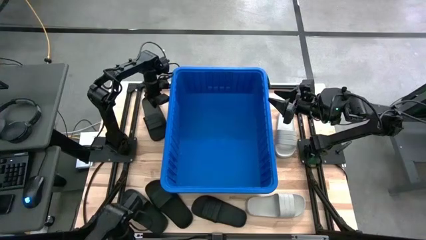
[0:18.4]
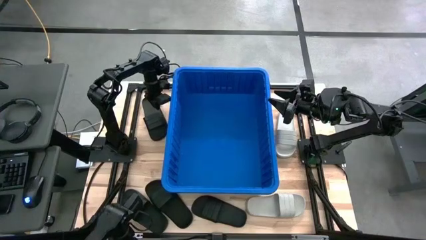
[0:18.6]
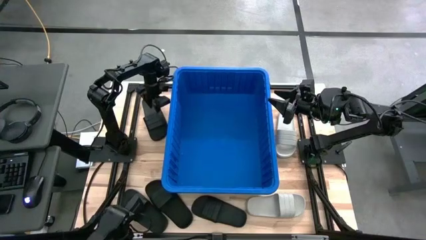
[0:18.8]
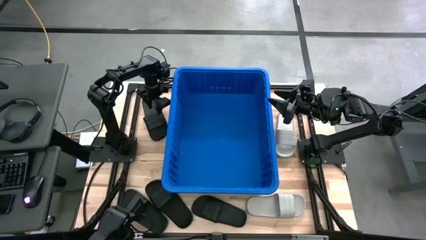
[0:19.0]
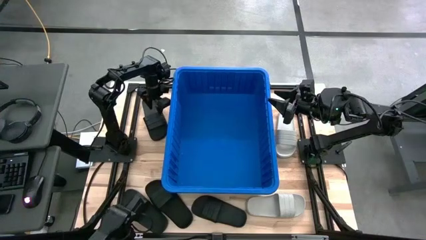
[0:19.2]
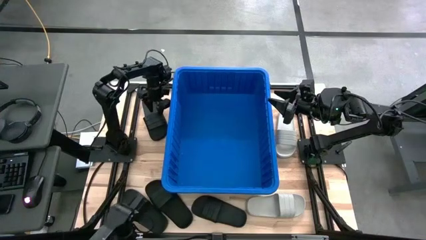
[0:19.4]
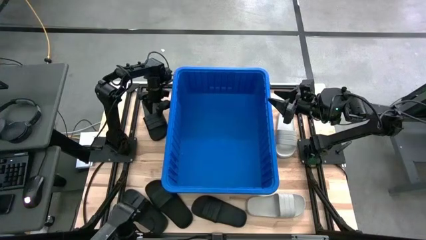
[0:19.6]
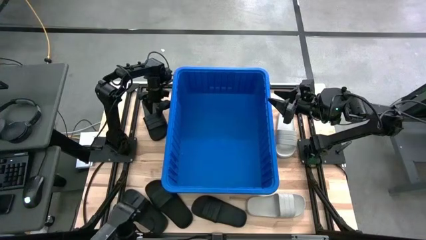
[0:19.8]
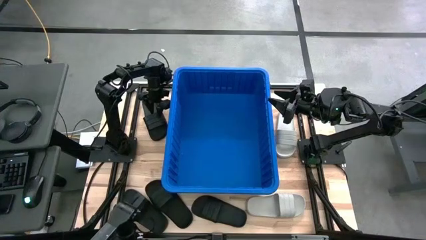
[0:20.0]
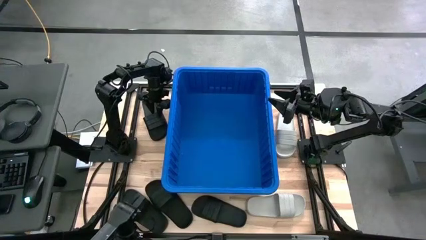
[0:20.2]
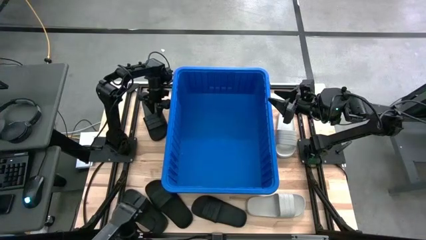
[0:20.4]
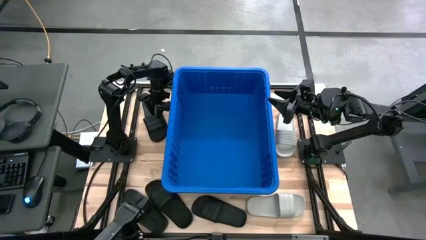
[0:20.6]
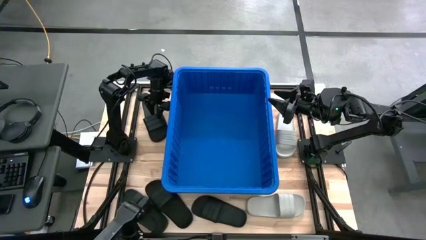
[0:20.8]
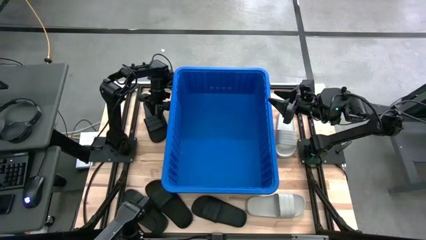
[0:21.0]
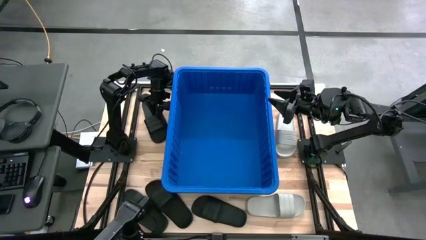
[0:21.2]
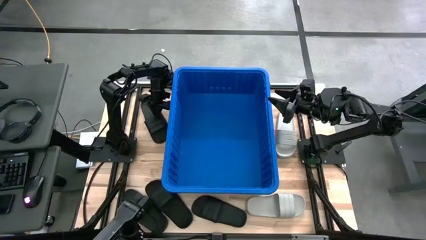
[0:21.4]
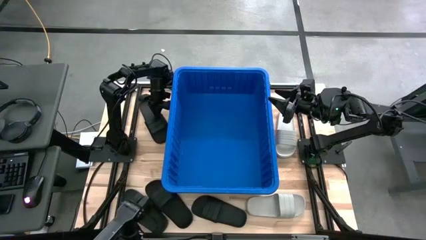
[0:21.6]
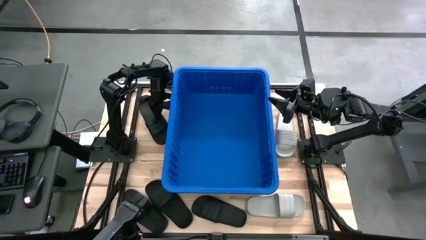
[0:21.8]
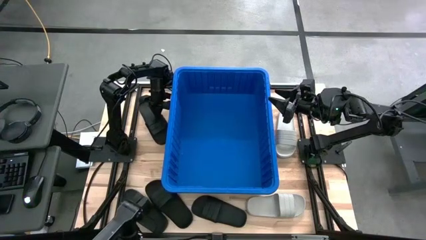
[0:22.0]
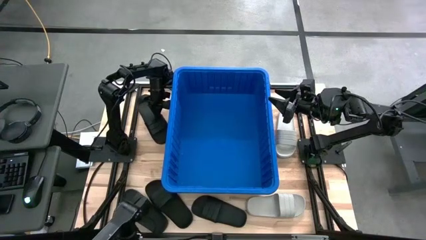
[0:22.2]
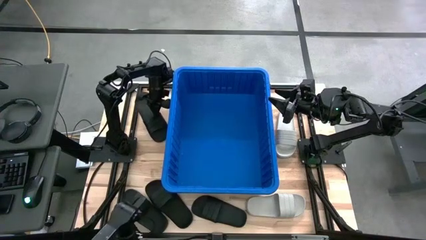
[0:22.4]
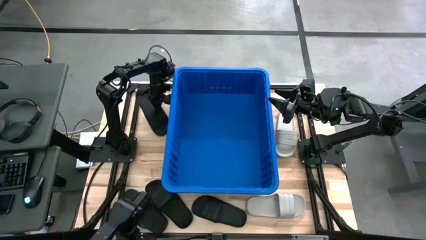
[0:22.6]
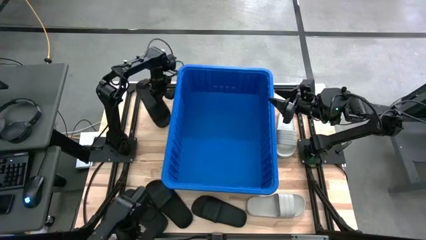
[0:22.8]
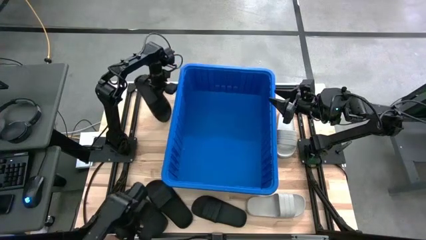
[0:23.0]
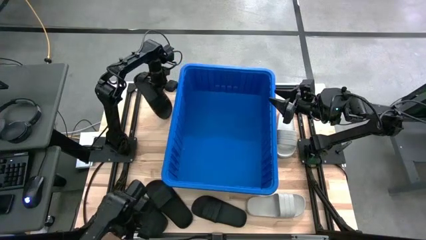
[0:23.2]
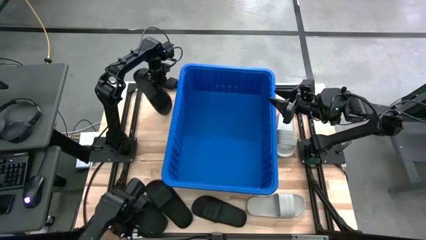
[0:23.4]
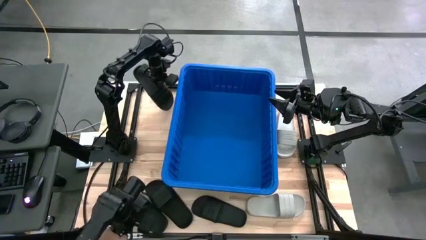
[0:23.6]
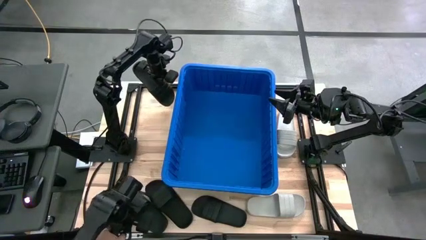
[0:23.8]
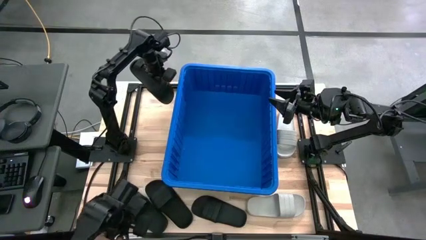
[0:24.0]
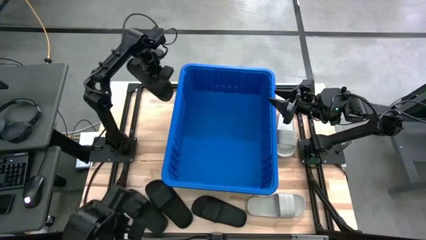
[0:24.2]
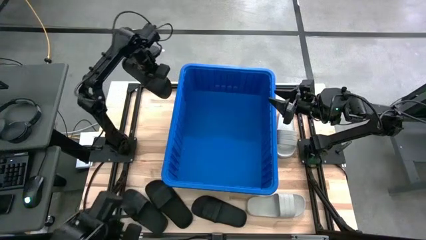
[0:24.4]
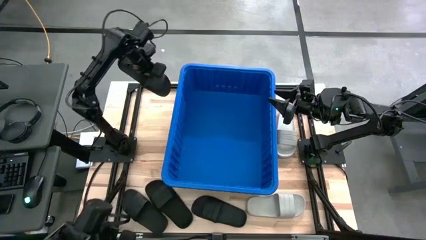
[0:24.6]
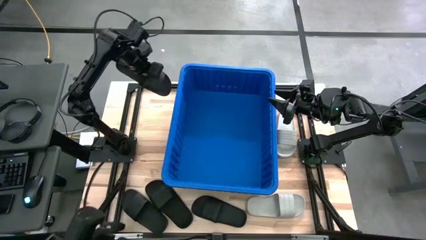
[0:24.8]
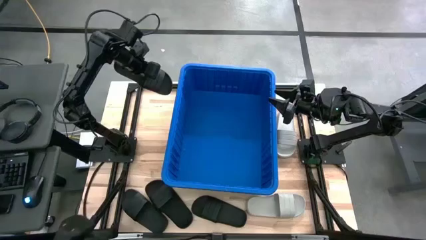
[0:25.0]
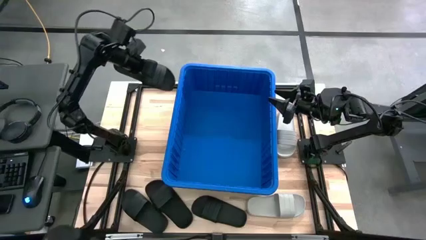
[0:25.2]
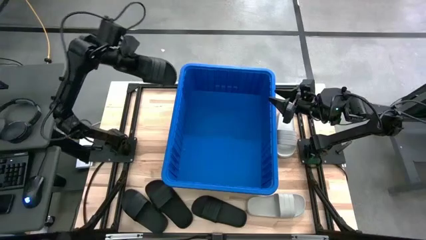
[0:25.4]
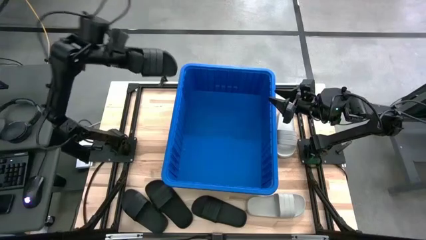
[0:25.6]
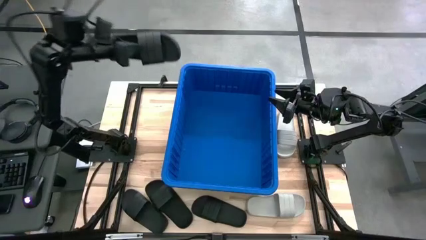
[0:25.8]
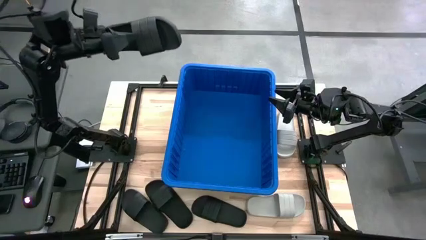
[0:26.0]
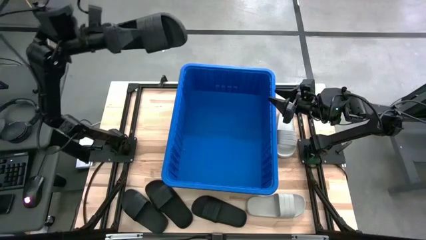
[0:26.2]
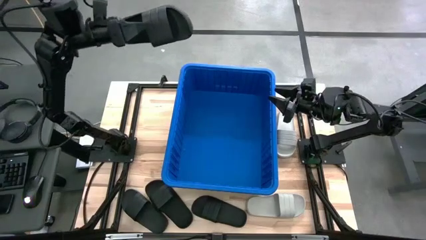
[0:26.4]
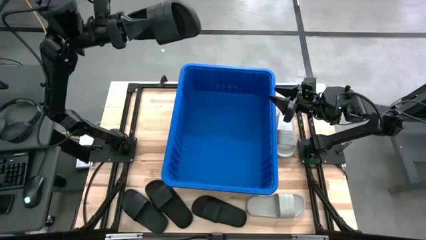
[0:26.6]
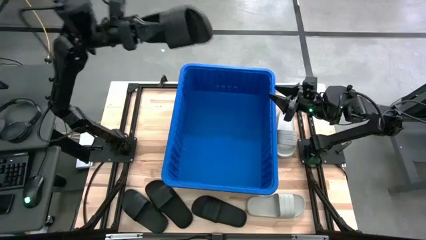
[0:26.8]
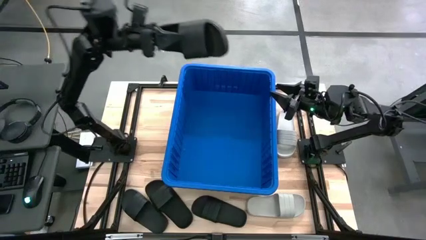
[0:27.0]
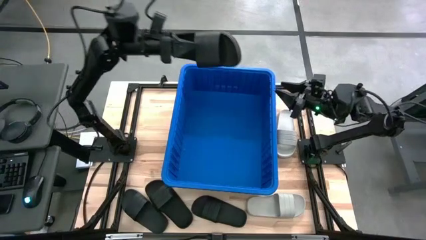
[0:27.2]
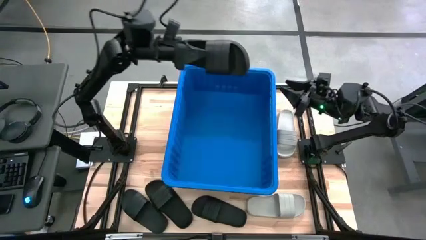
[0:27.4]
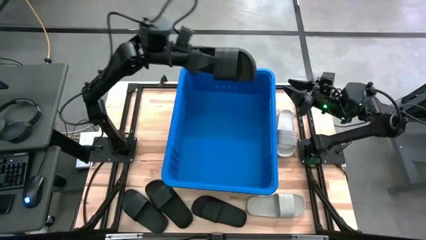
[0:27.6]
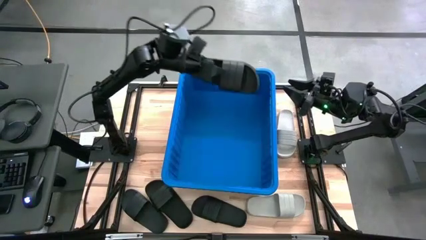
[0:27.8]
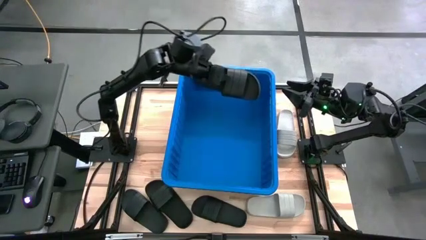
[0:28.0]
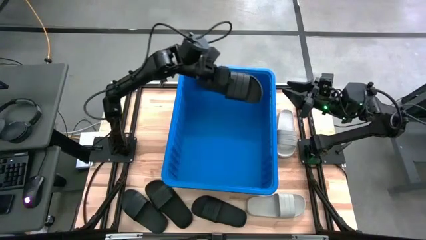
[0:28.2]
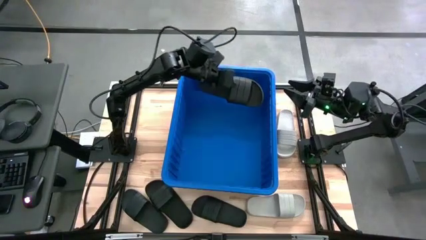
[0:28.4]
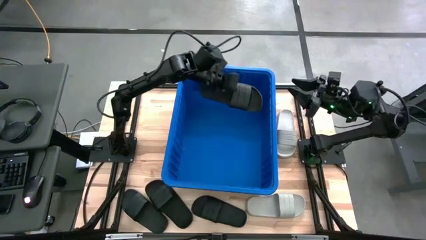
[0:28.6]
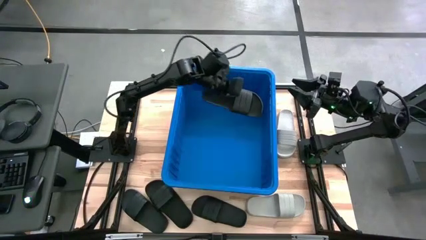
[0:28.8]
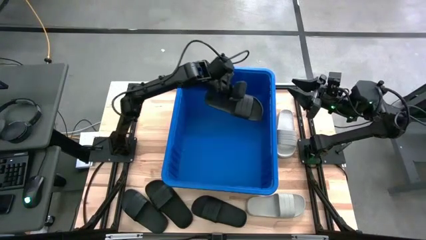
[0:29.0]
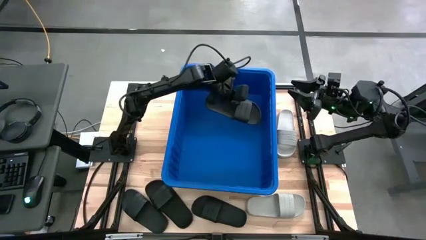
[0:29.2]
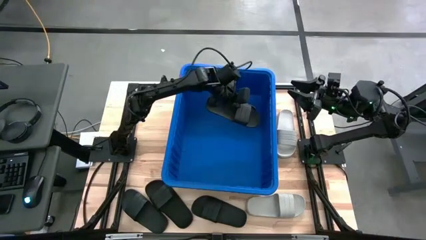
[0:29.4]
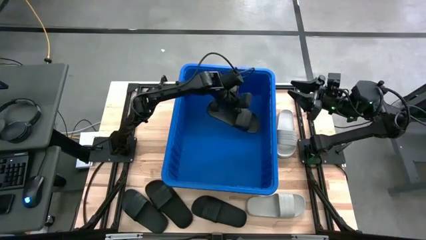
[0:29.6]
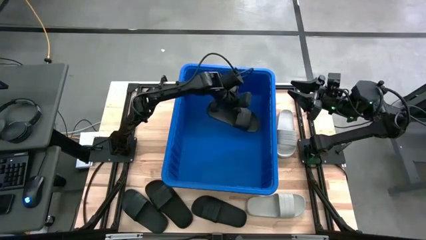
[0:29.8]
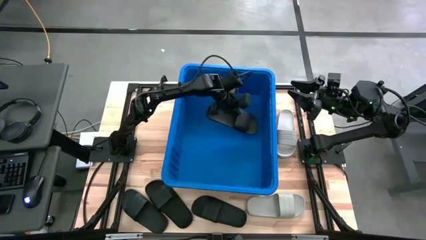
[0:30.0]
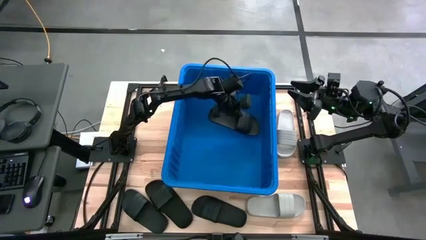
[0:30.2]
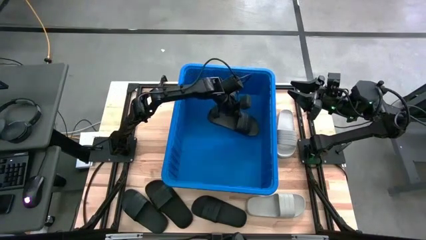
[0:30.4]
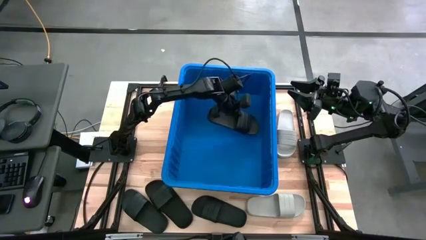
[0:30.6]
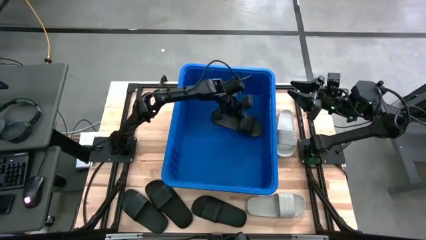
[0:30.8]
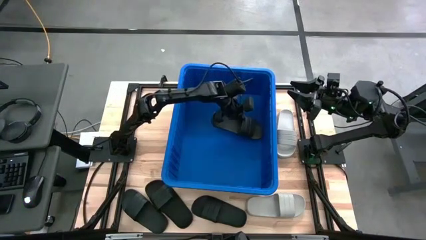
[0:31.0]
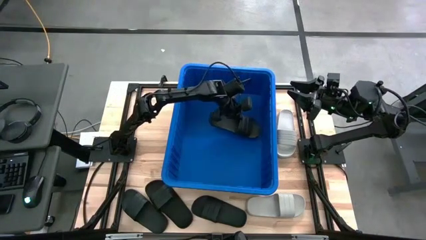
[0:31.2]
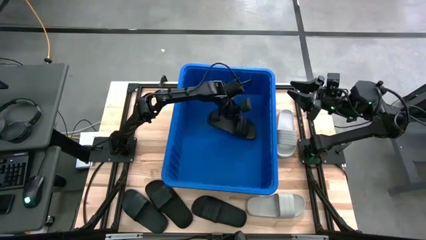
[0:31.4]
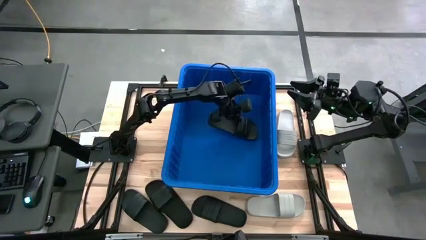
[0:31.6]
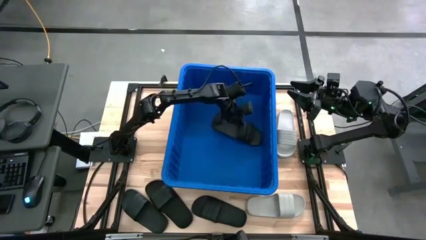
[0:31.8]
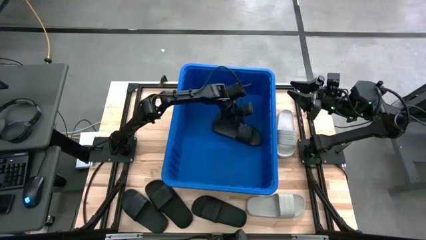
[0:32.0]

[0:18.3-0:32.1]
Task: Pick and place slides into bin
Put the black slipper into the blue bin

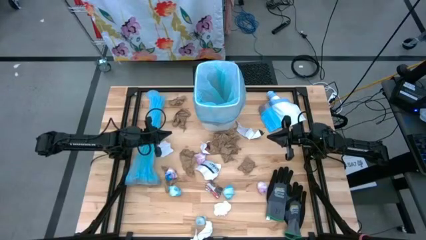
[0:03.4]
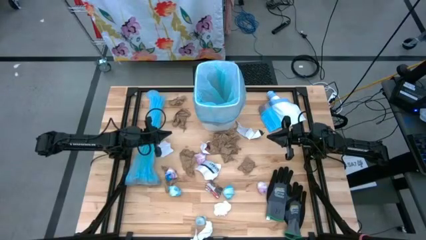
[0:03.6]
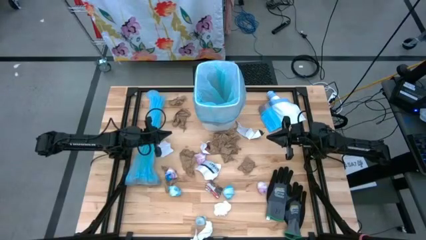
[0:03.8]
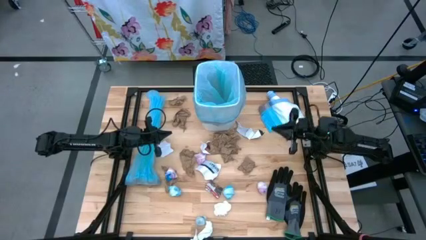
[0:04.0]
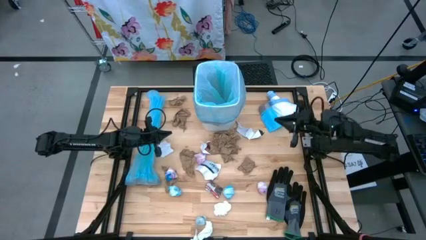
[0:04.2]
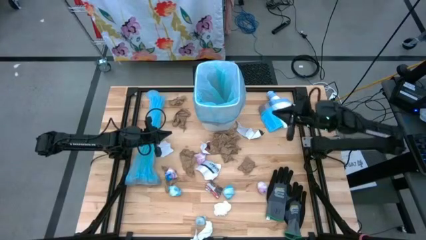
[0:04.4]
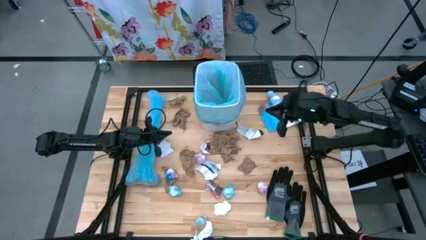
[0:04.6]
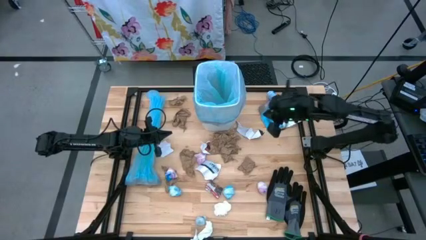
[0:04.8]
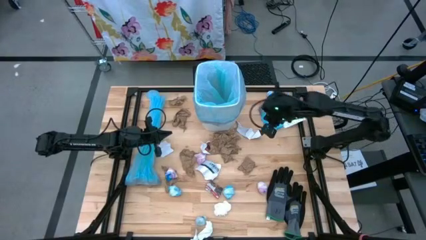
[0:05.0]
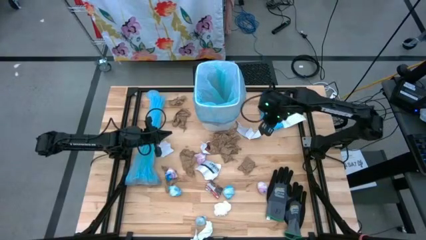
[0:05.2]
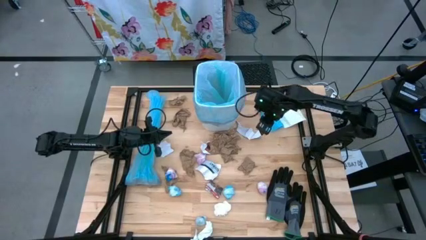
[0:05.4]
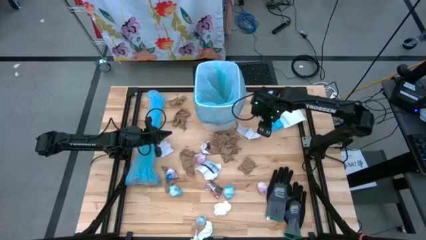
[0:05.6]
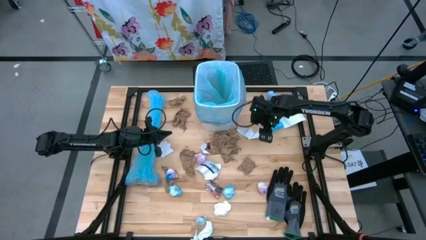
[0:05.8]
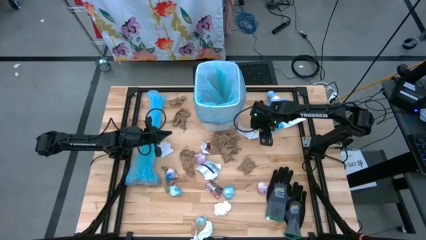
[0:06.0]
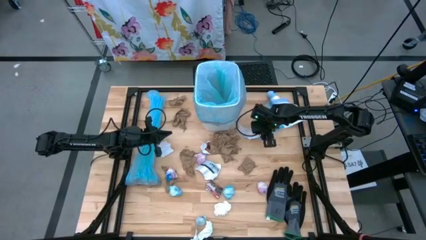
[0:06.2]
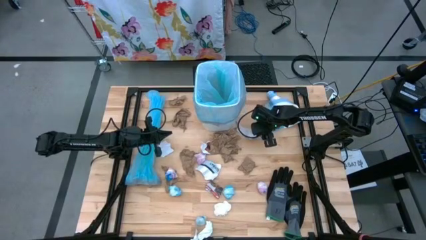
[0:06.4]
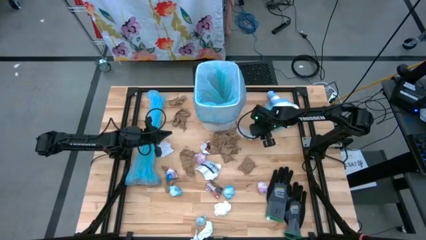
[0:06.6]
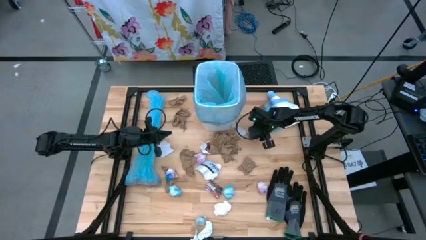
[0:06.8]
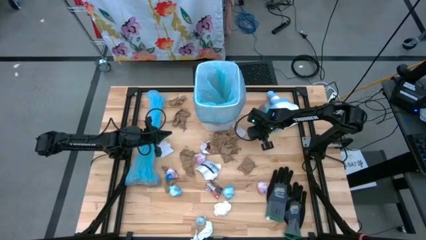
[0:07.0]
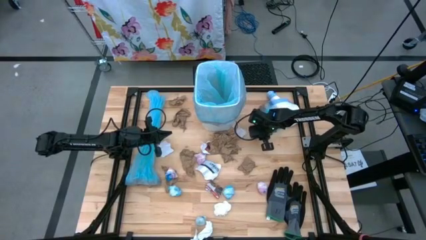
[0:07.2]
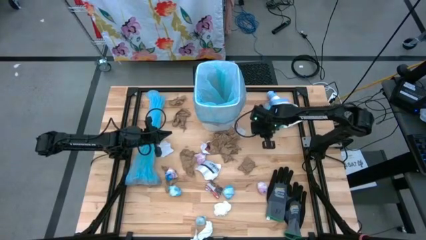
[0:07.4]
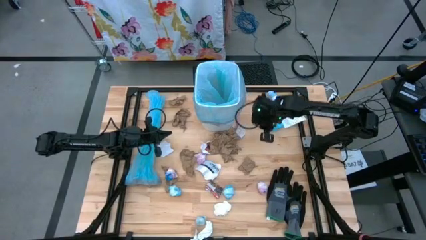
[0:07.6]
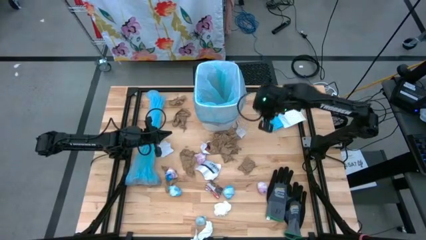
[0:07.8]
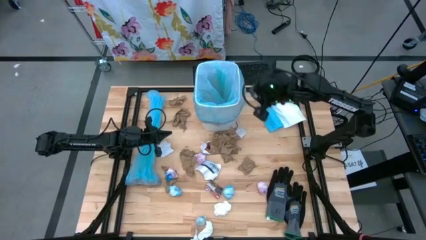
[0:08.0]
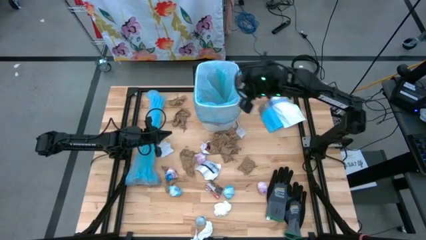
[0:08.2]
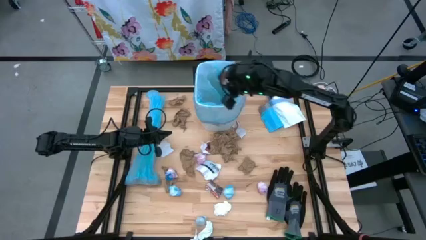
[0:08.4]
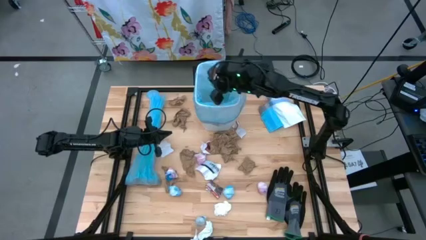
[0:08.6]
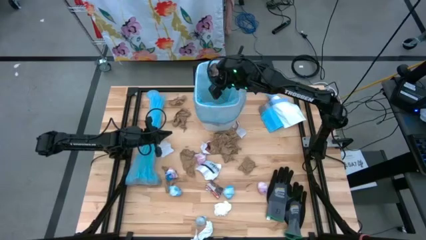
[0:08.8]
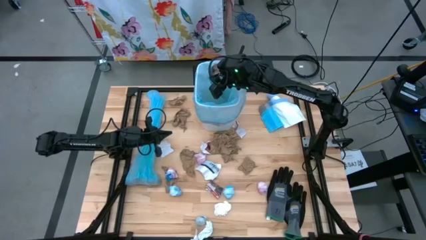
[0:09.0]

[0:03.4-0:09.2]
Task: place trash/remove bag and relplace
Put the brown paper into the blue trash bag inside the white trash bin
